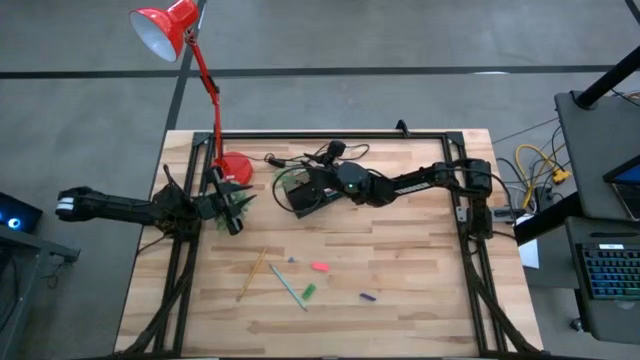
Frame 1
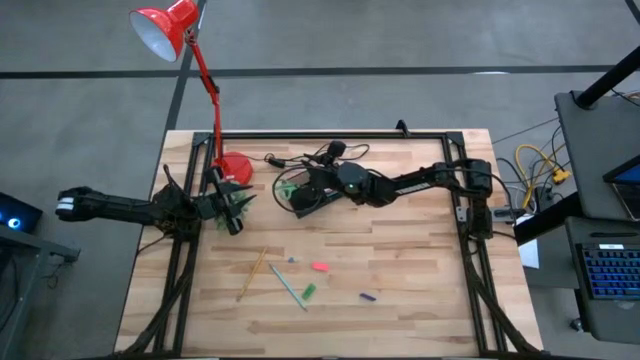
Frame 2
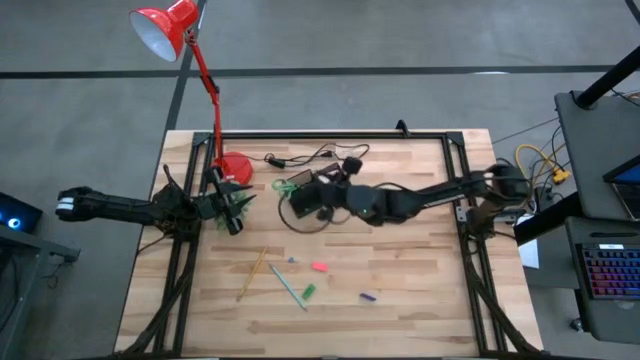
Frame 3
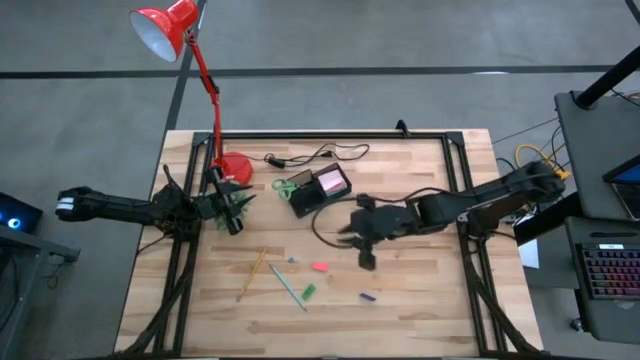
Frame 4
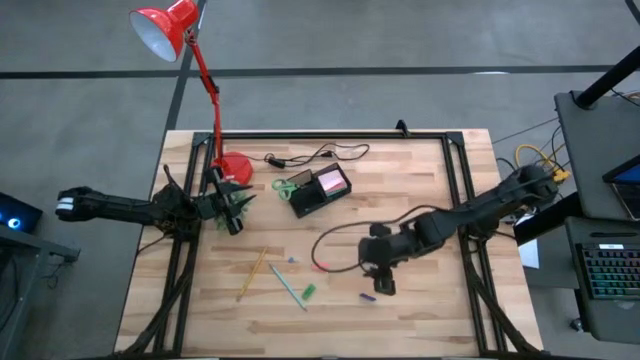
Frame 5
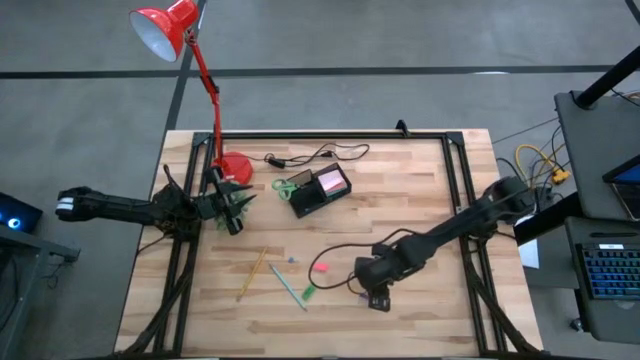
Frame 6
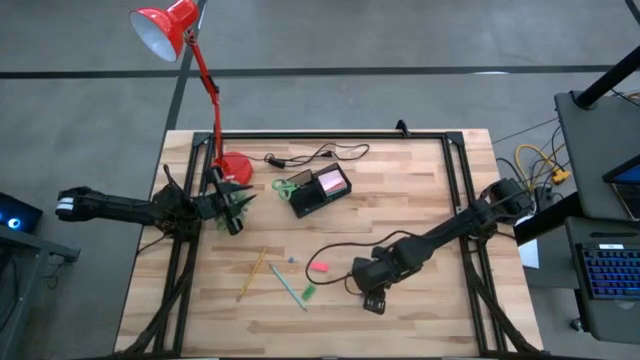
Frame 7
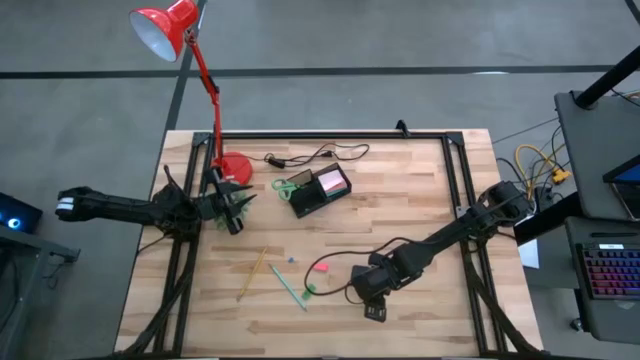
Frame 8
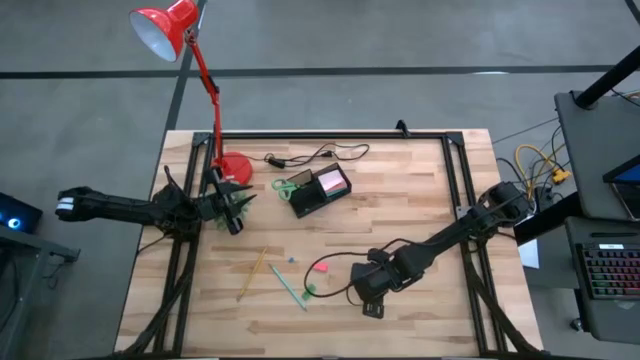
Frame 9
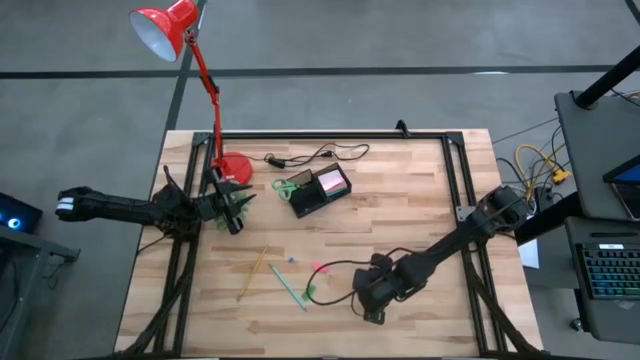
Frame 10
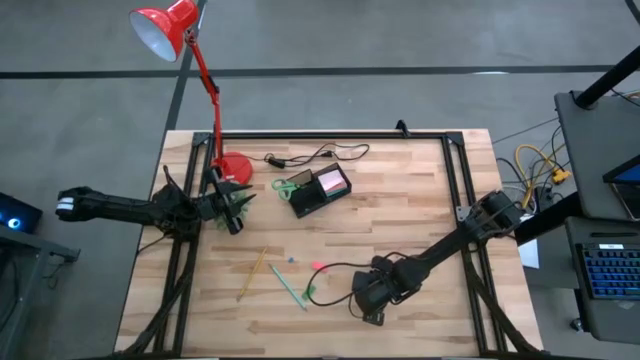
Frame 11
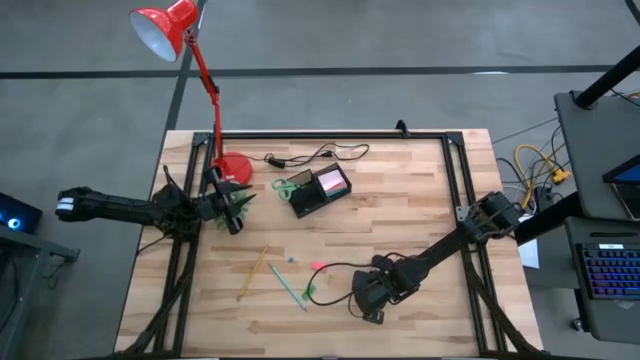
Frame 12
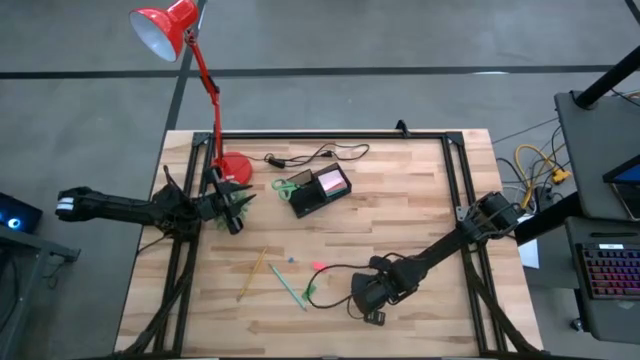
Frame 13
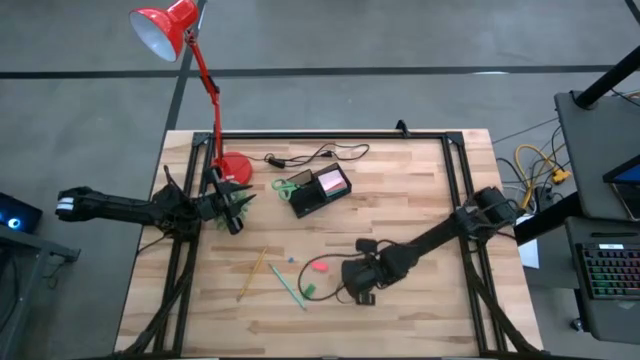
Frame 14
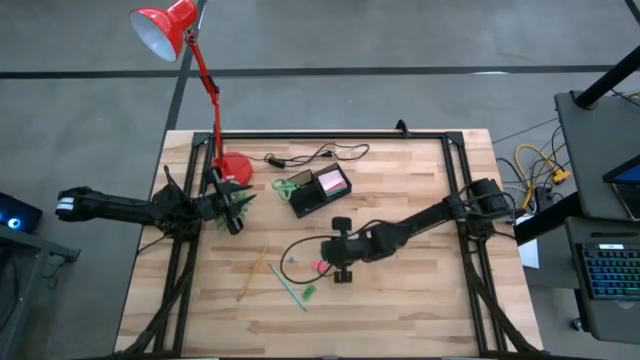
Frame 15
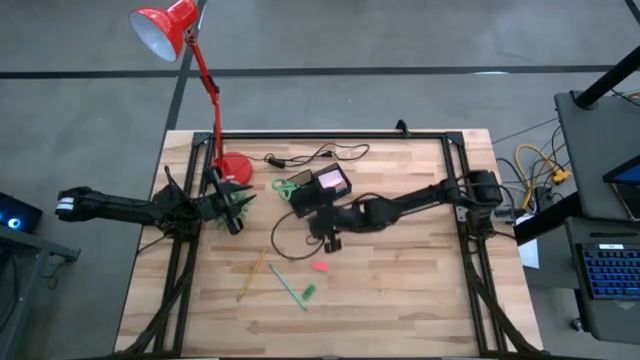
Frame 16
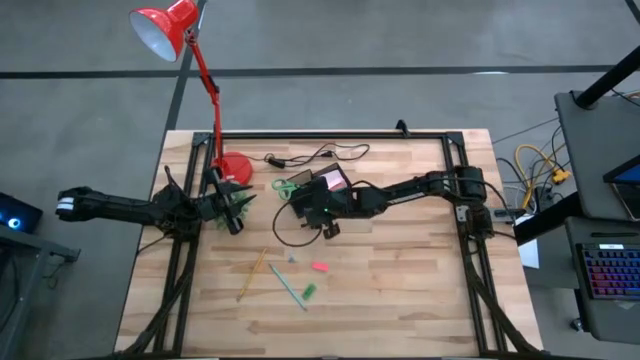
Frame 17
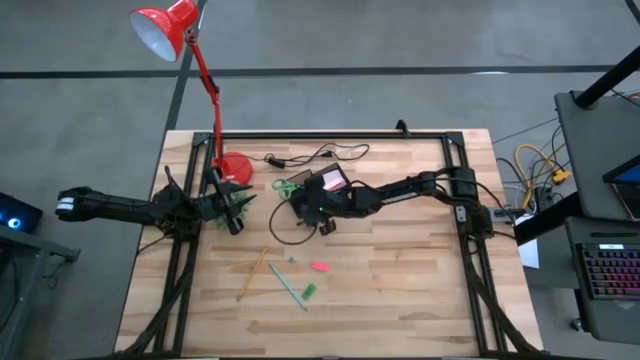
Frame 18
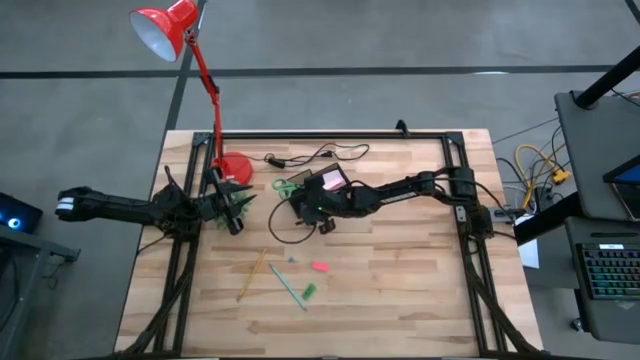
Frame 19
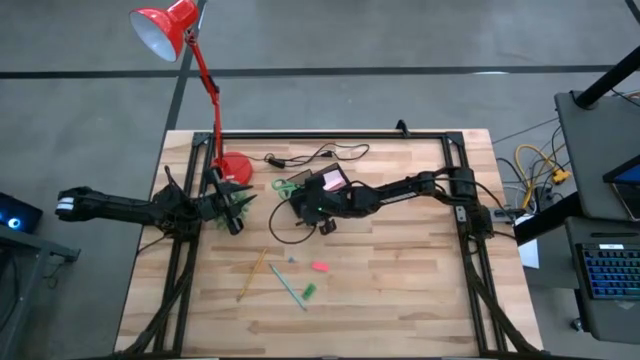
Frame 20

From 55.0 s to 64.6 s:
Task: Pick and place office supplies into organizer
Put the blue eraser into the black desk organizer

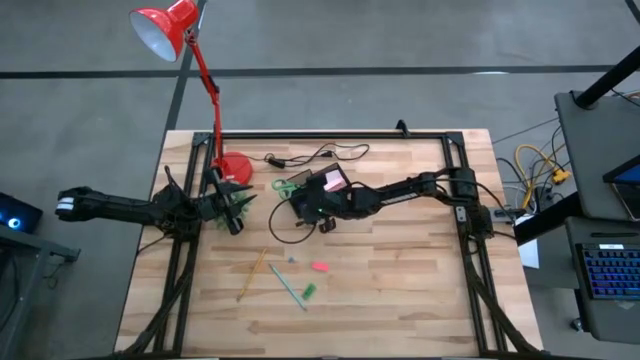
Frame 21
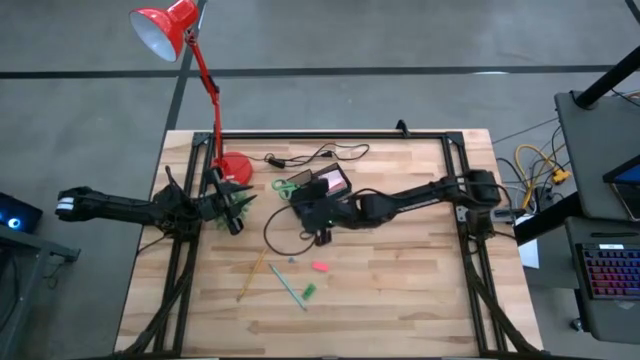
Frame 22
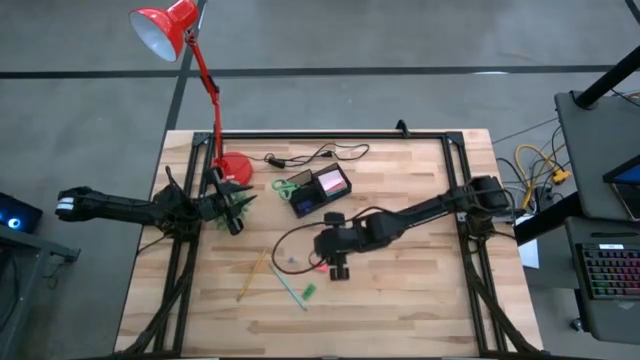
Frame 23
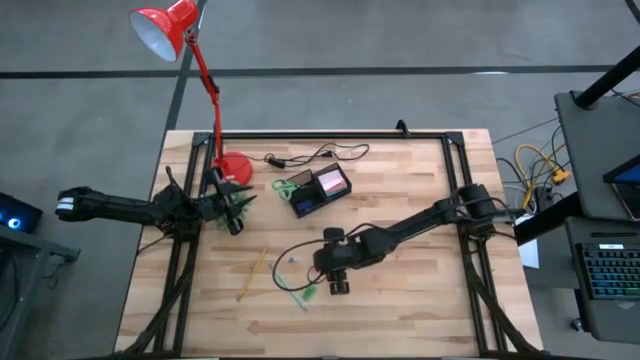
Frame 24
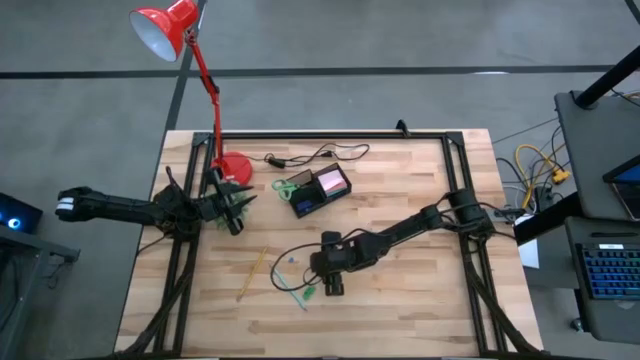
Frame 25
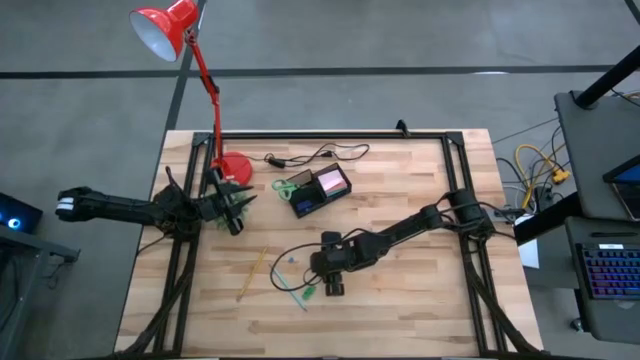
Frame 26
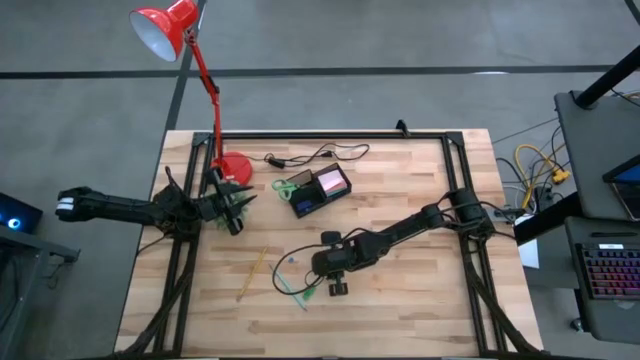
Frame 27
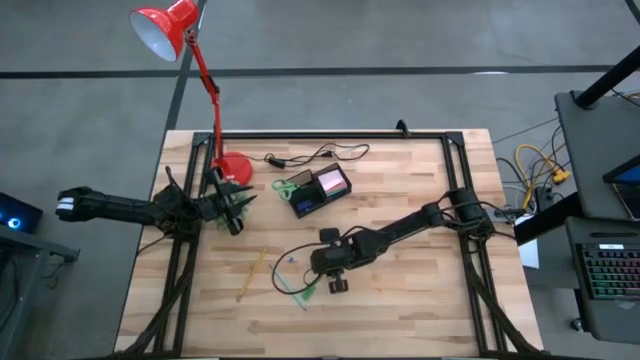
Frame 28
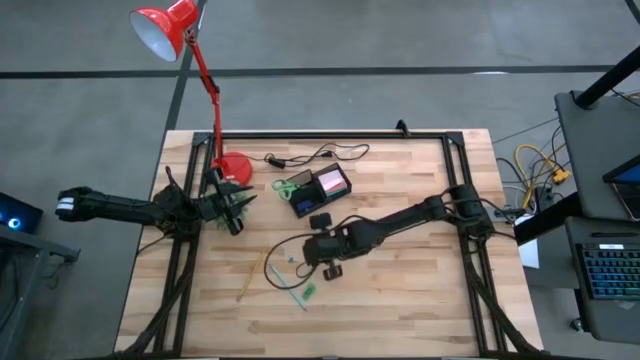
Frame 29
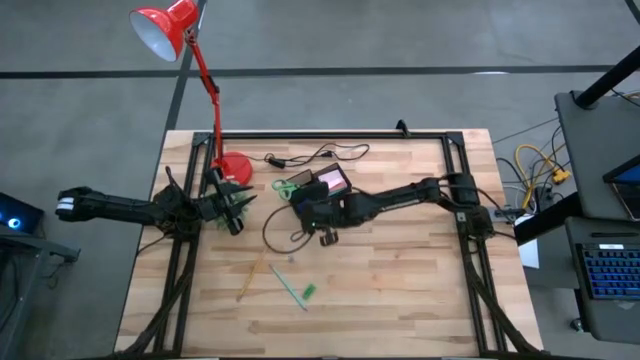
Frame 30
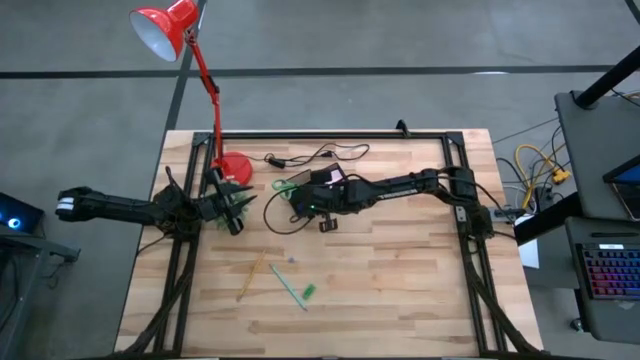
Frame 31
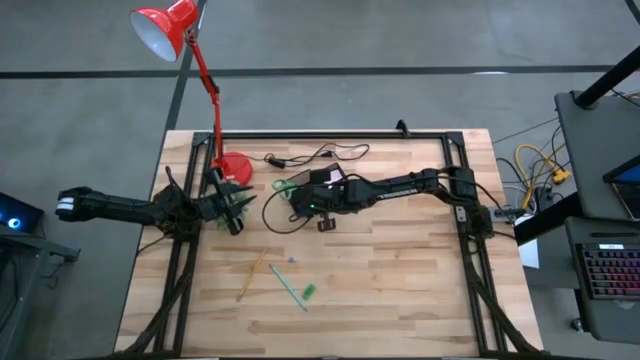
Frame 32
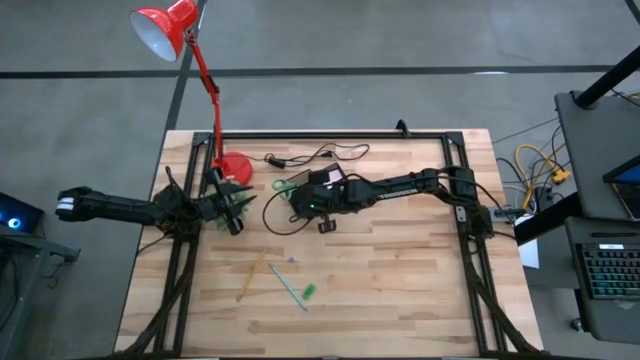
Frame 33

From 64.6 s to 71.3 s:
Put the pink eraser into the black desk organizer

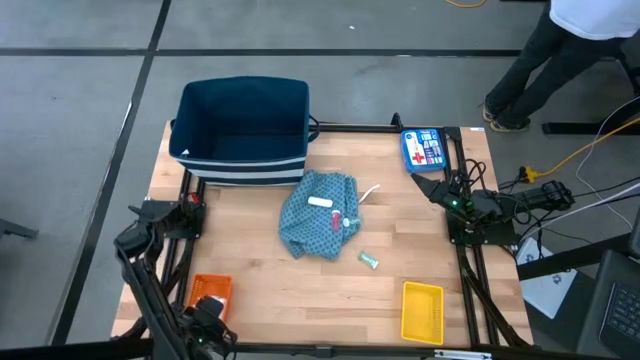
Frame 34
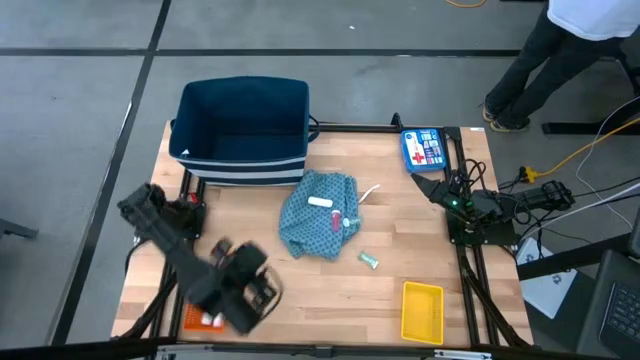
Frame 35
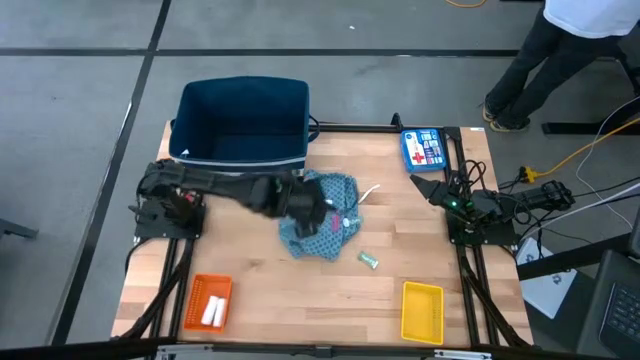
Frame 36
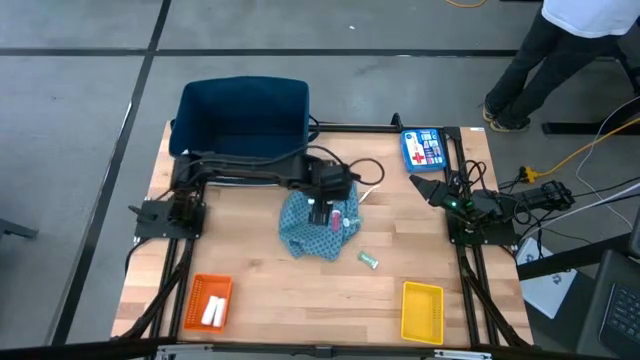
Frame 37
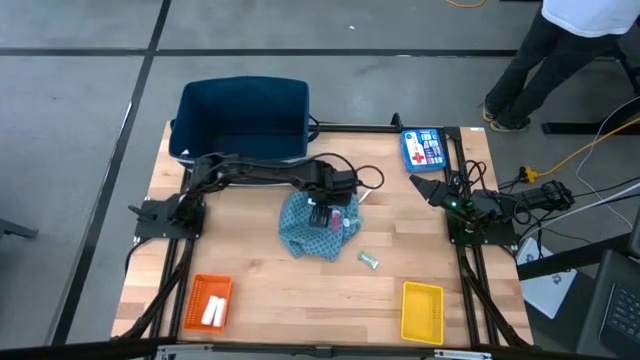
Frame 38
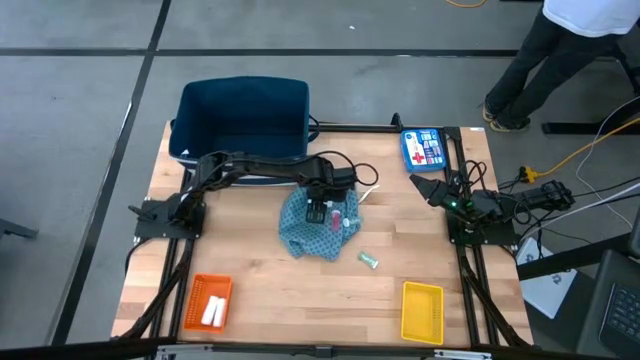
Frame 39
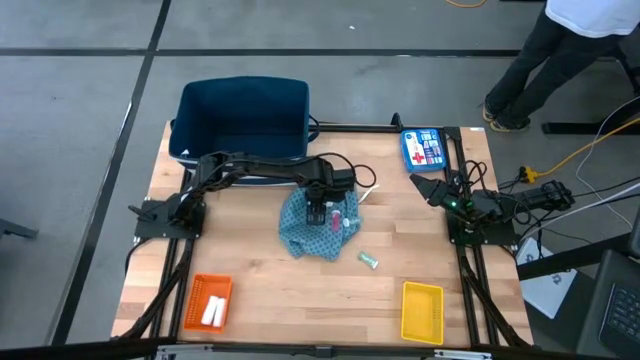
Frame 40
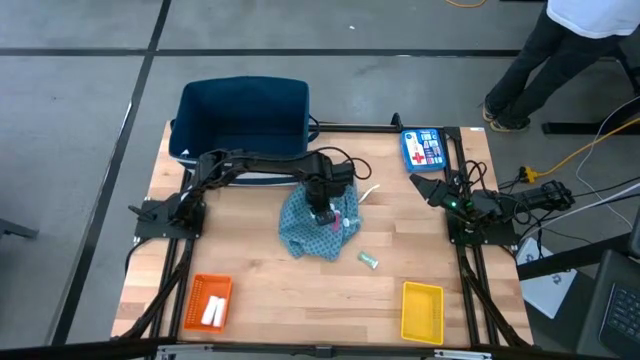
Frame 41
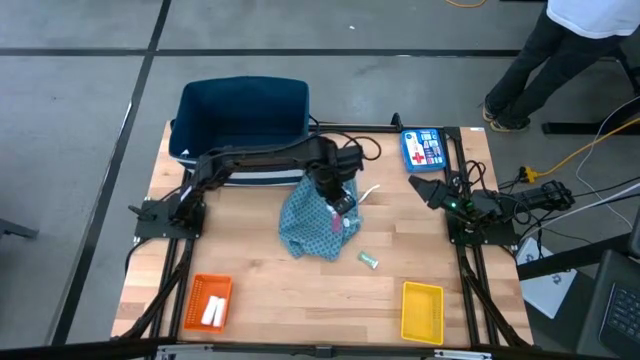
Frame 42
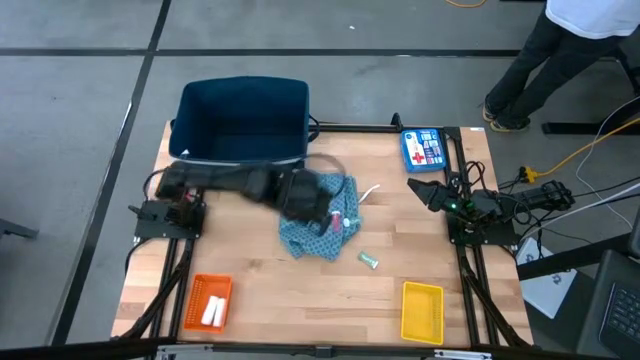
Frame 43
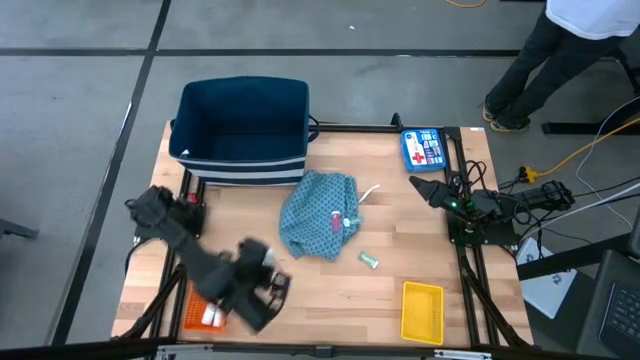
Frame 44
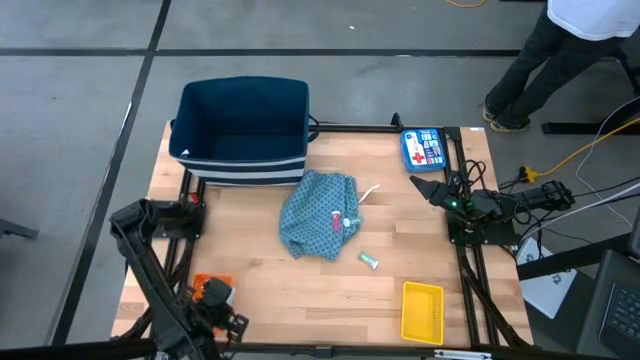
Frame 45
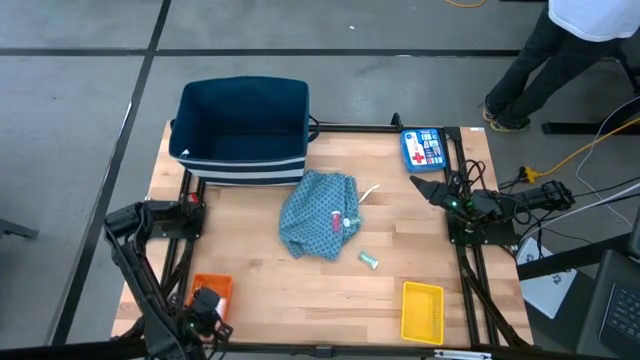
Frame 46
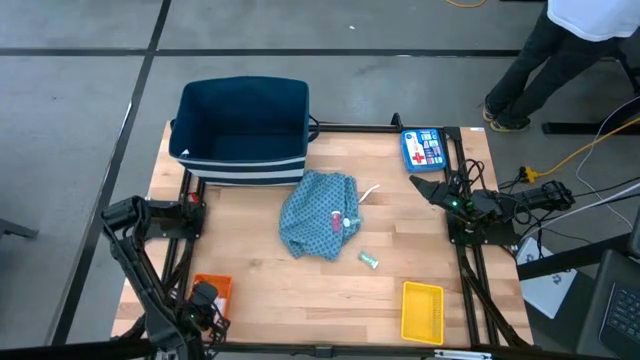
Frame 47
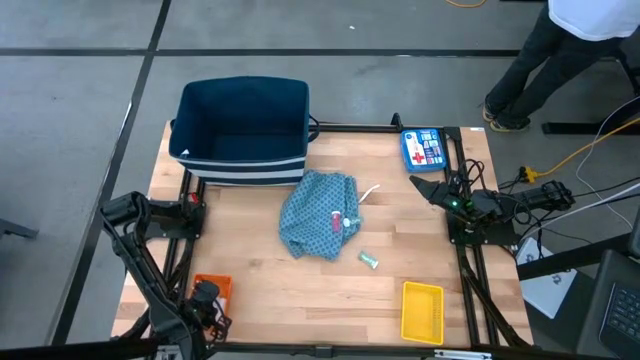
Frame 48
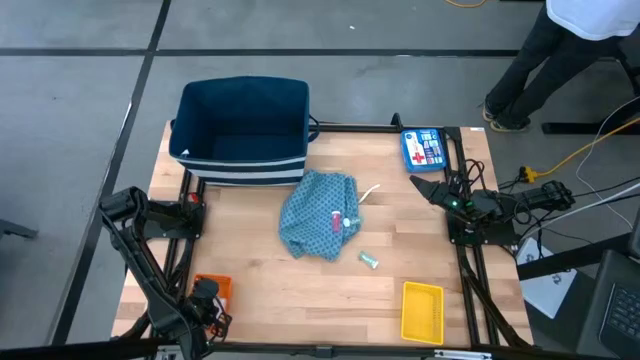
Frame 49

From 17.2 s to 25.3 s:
Task: Pick & Place Medicine items
Put the white rolled gauze into the orange bin
